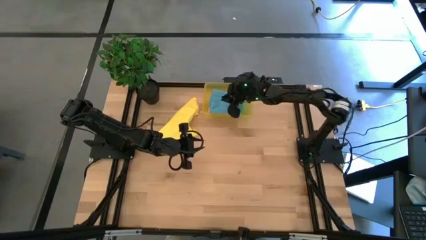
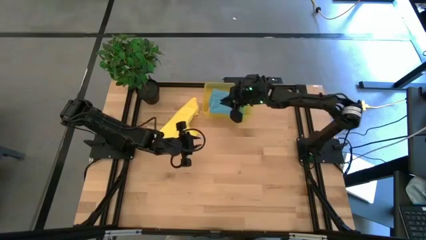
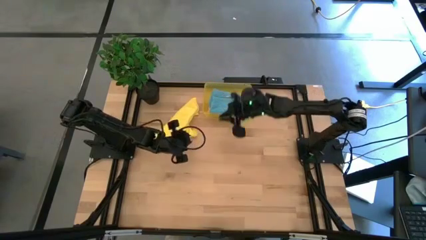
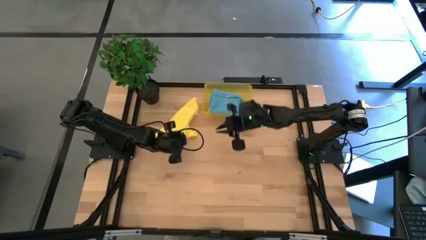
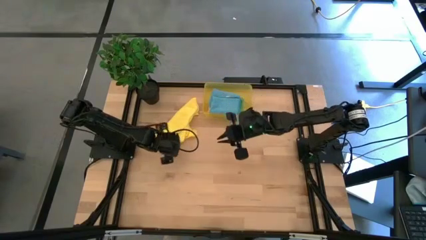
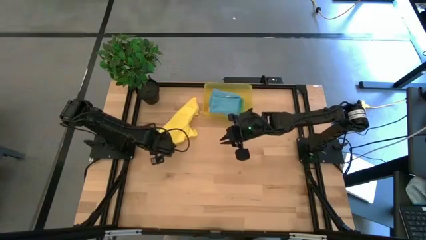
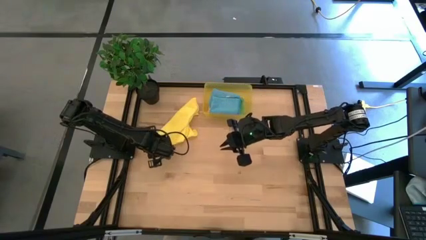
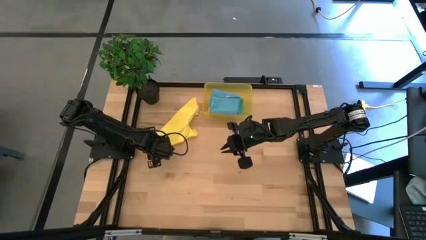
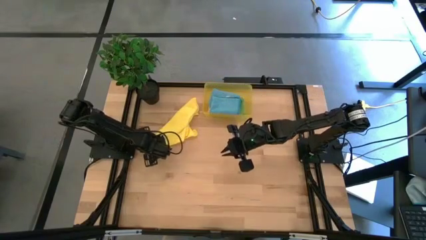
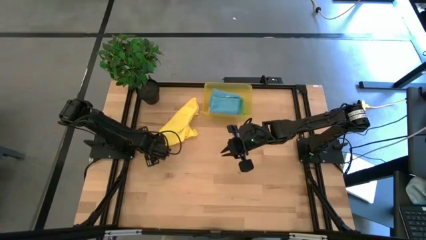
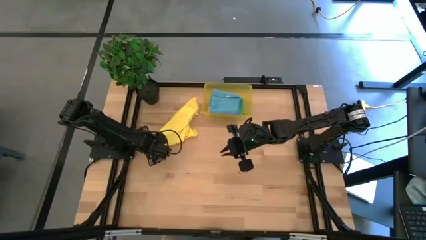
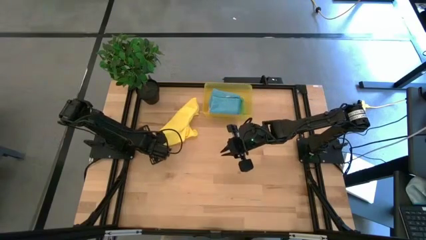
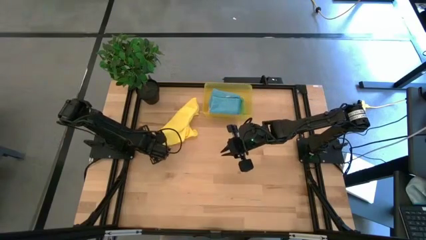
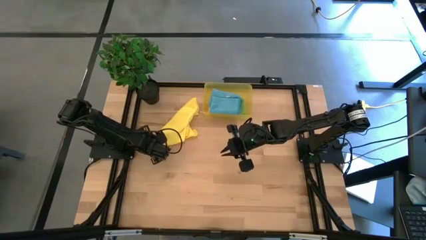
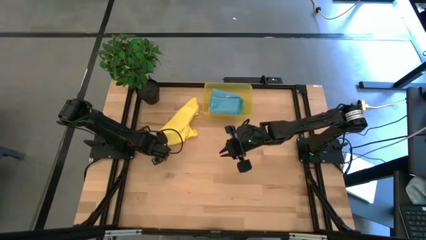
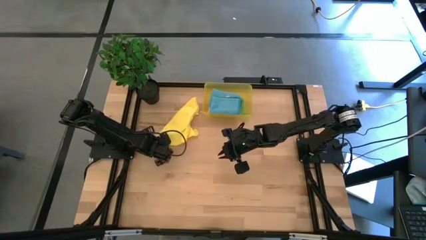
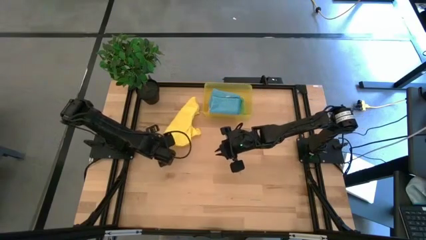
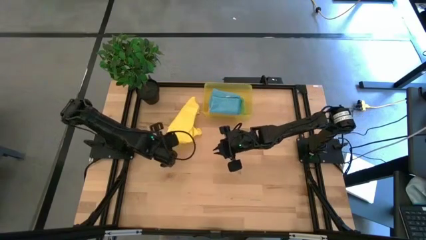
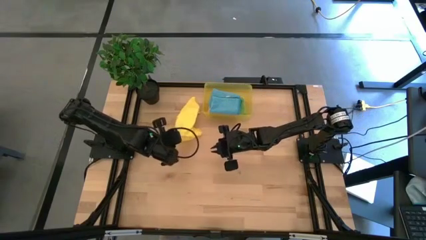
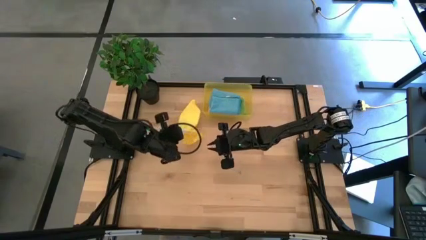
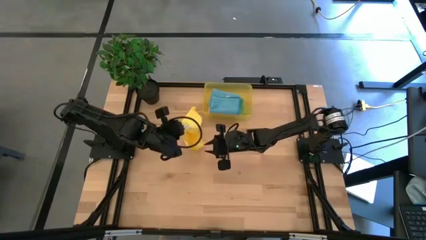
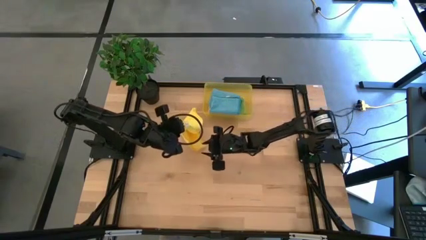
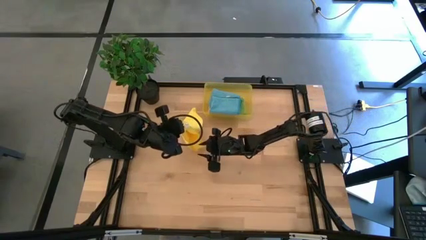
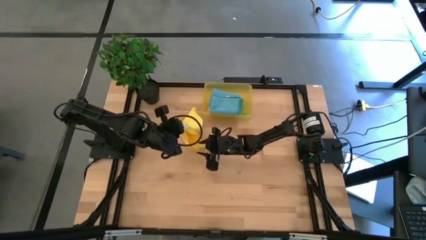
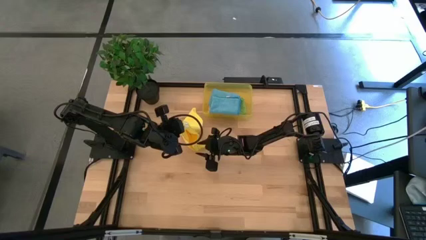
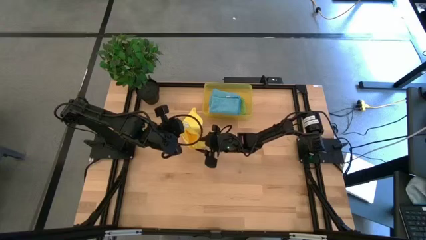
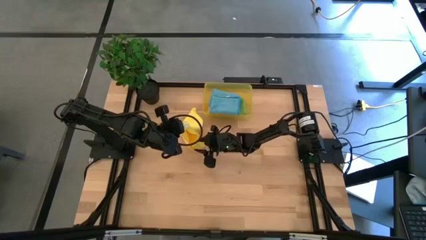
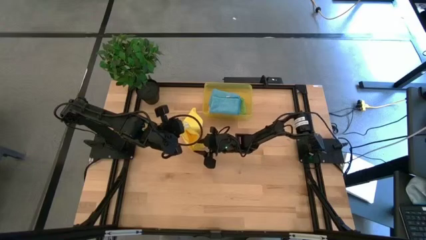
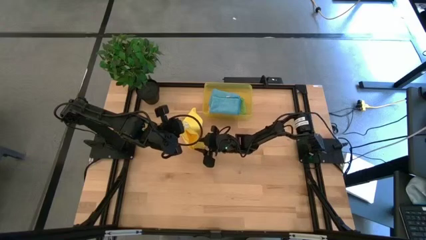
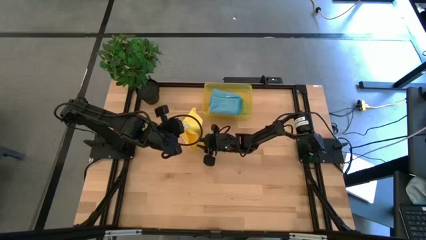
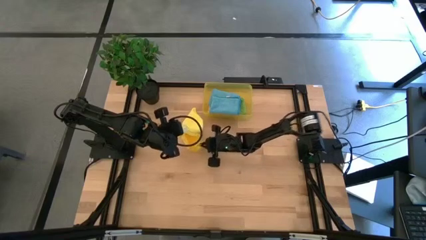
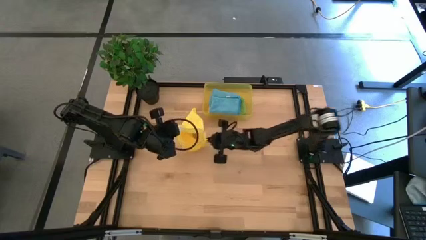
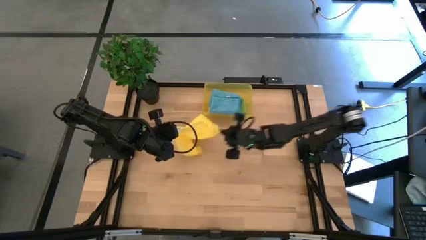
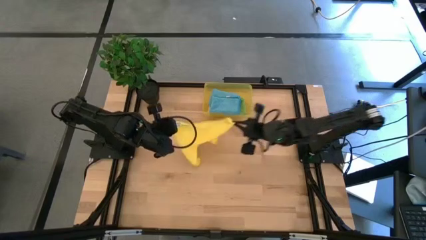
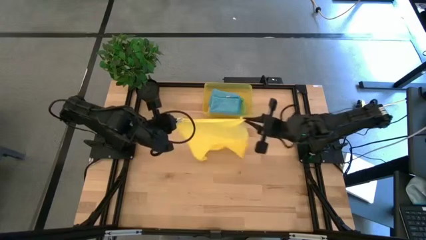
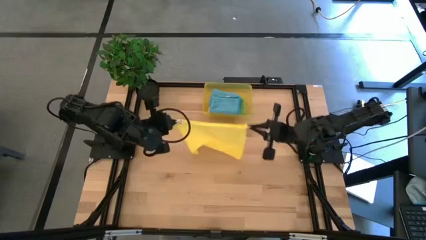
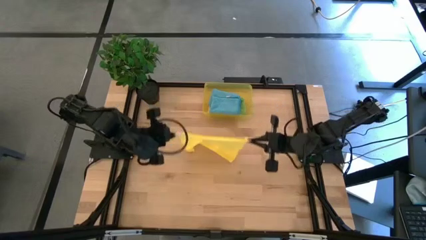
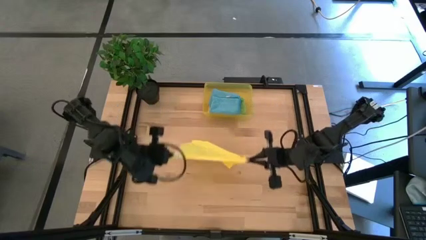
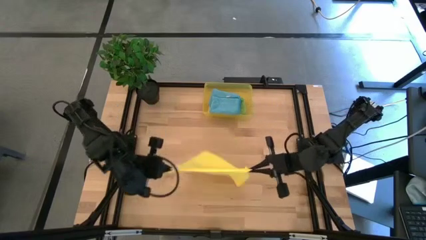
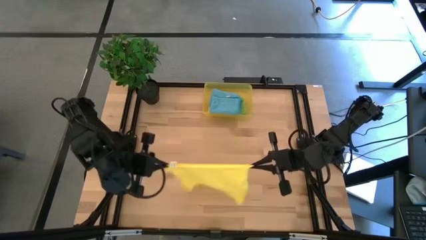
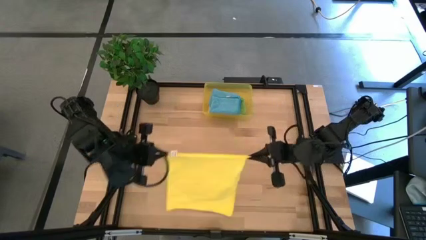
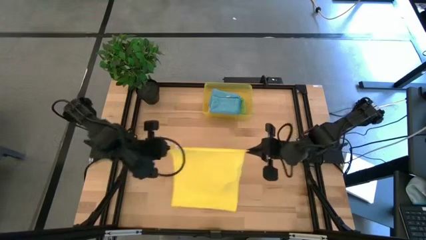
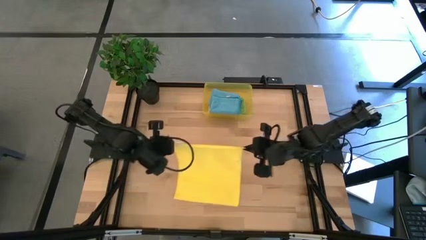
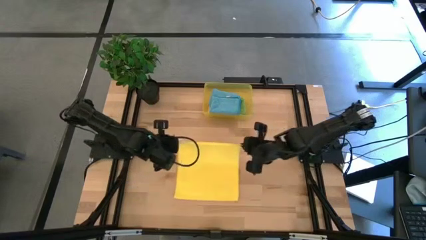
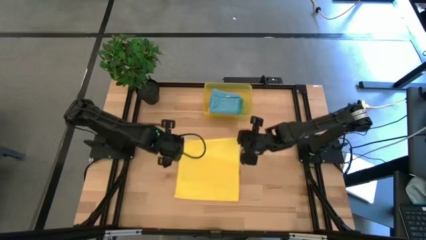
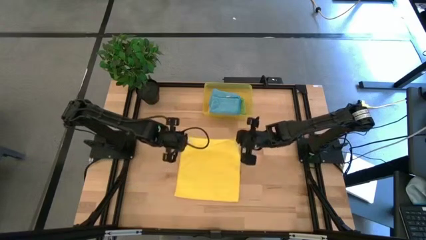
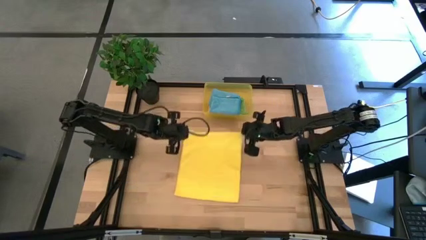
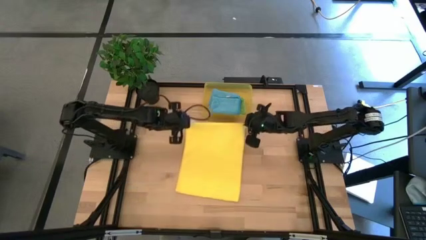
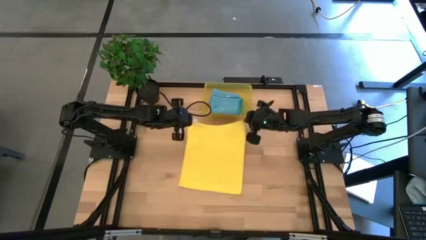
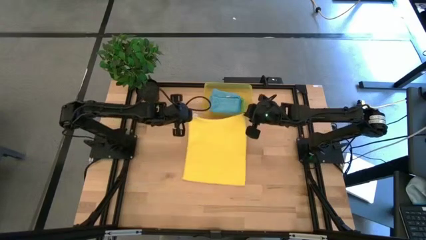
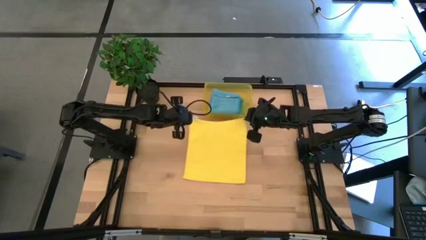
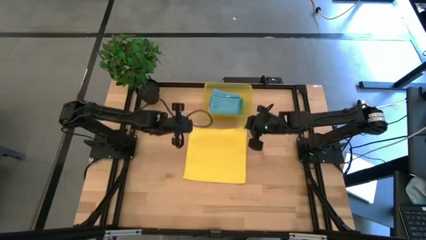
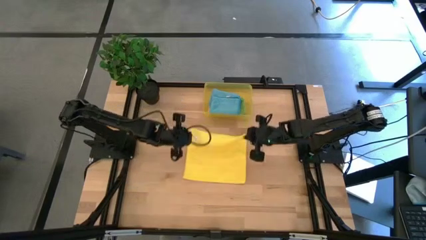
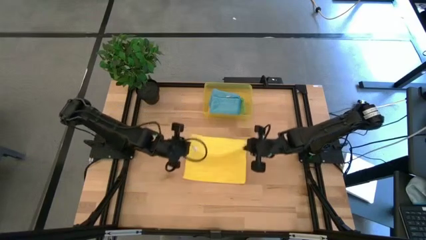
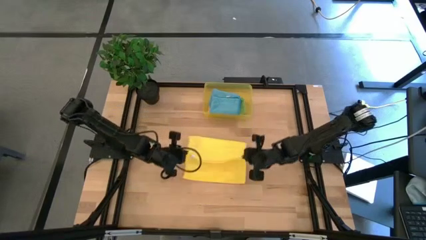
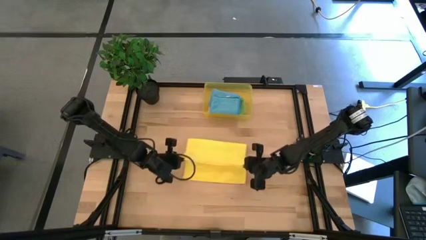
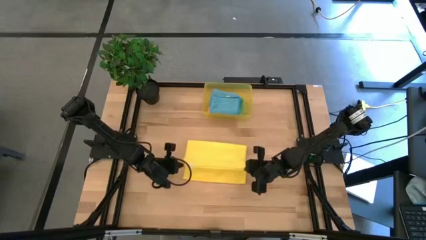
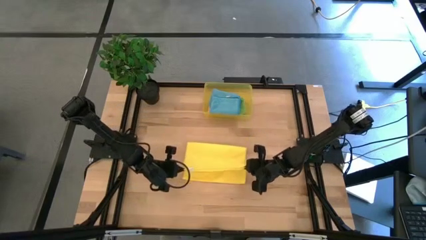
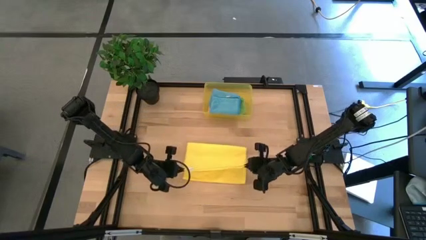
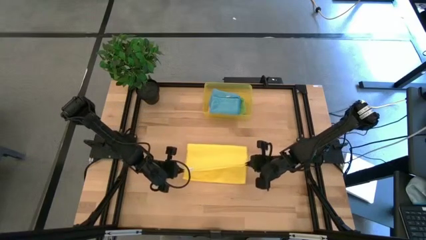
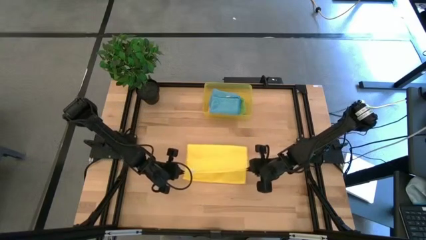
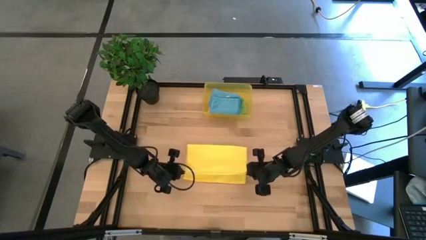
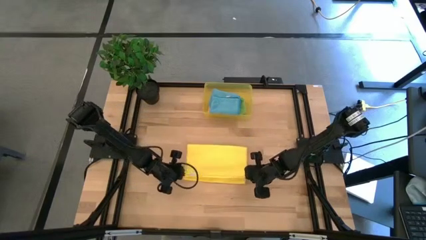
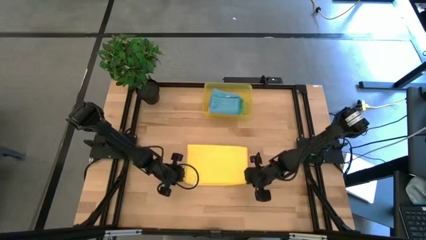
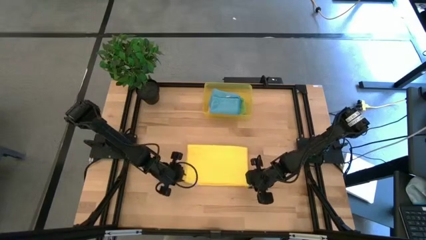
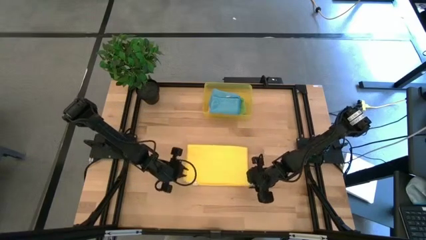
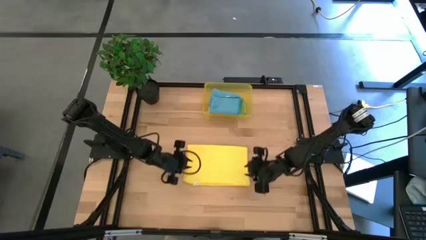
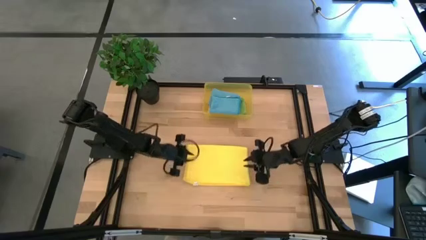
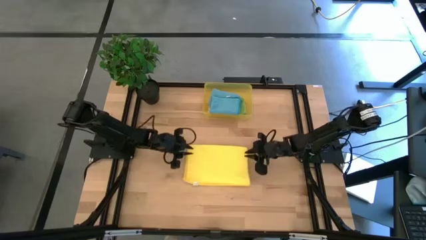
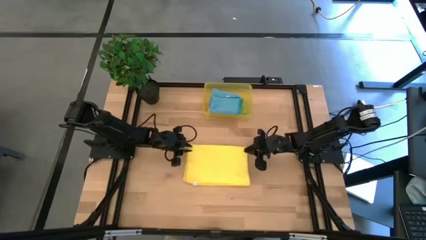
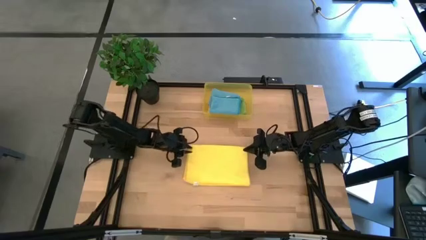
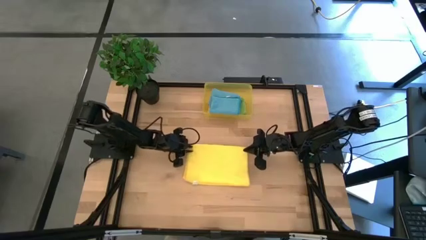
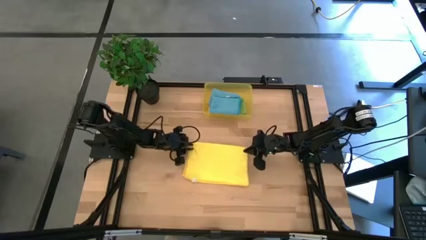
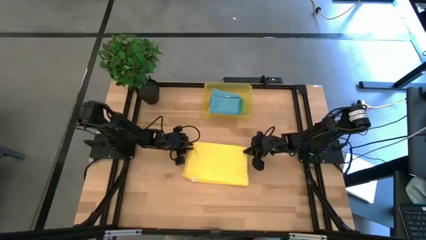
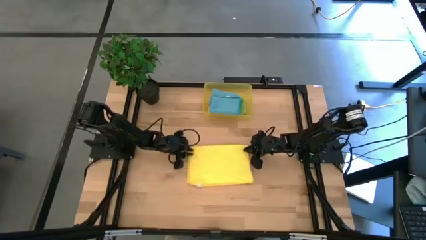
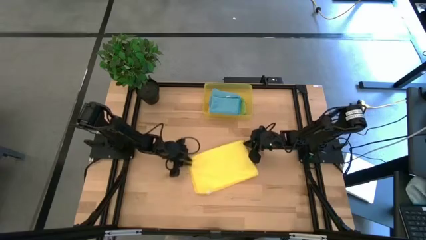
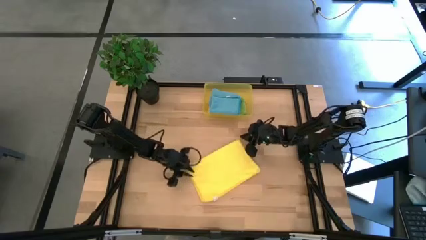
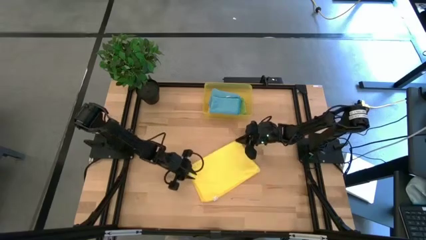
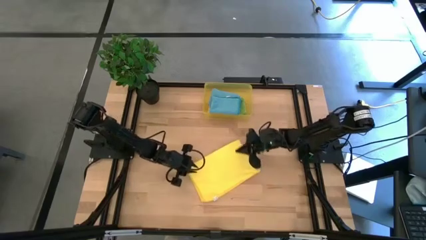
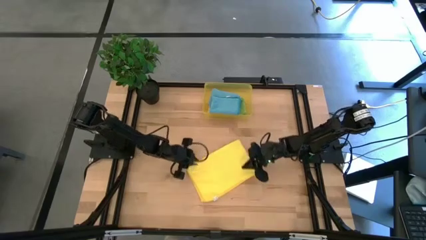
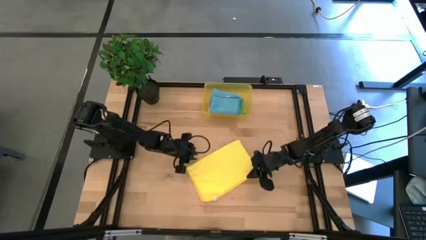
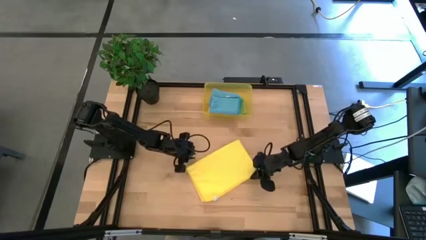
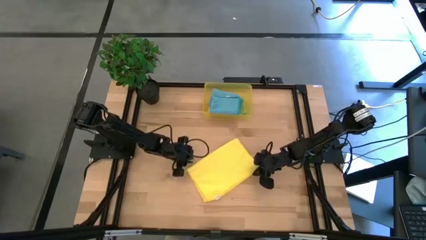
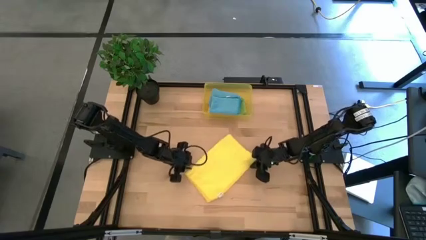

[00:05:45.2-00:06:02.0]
Task: Fold microfiber towels
Fold the yellow microfiber cloth
